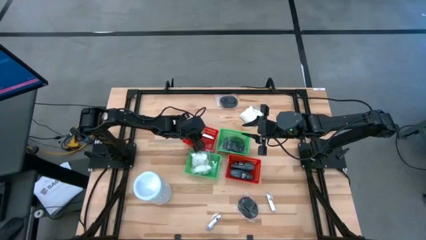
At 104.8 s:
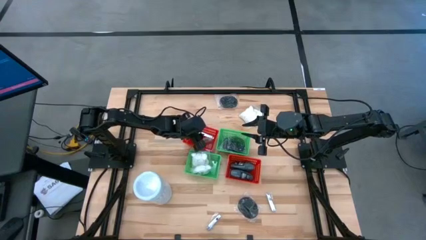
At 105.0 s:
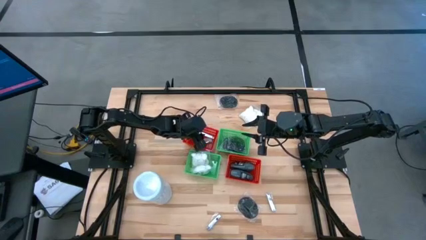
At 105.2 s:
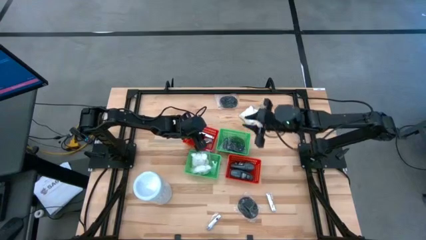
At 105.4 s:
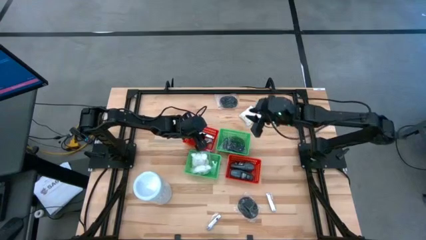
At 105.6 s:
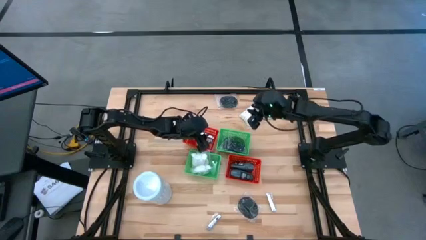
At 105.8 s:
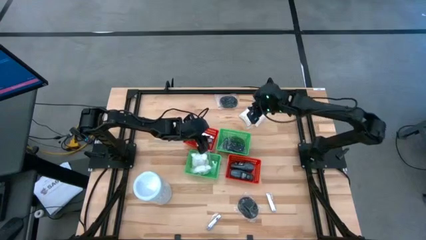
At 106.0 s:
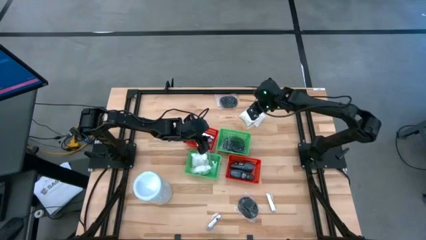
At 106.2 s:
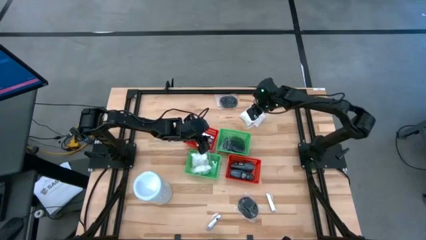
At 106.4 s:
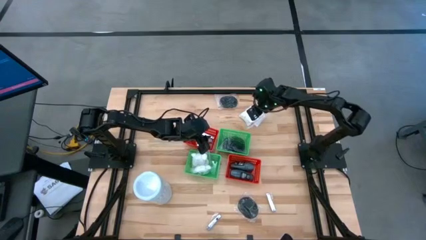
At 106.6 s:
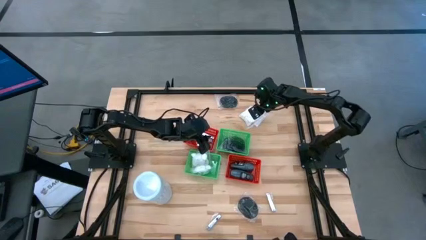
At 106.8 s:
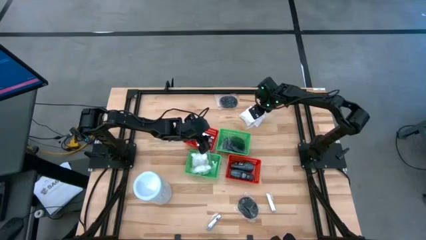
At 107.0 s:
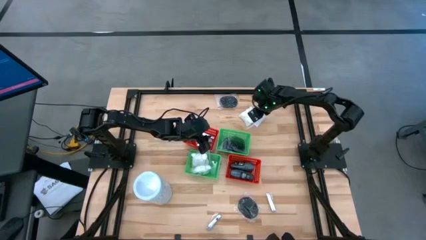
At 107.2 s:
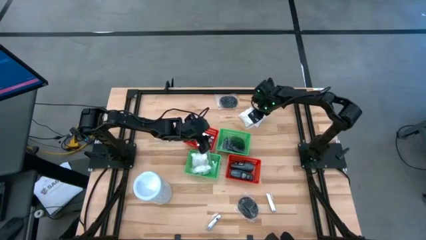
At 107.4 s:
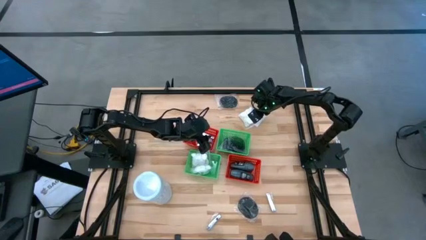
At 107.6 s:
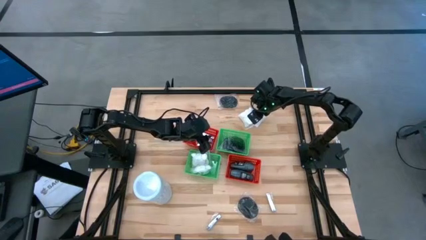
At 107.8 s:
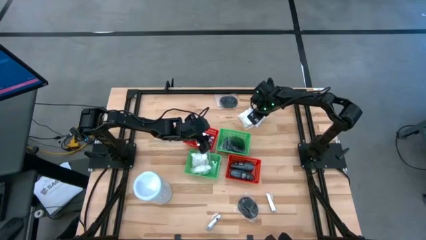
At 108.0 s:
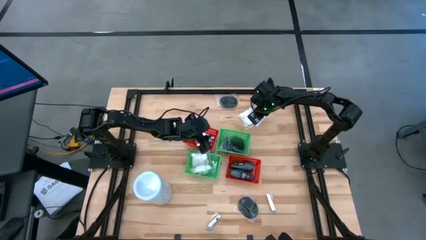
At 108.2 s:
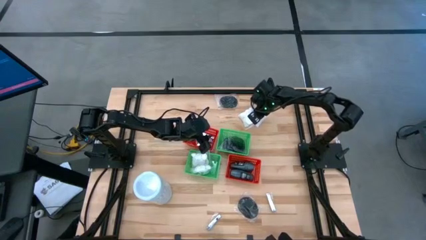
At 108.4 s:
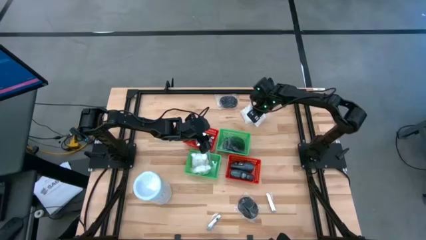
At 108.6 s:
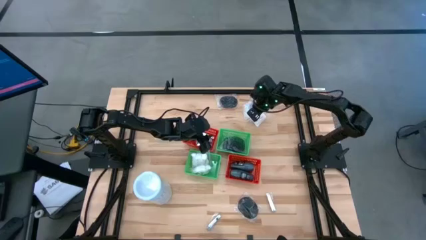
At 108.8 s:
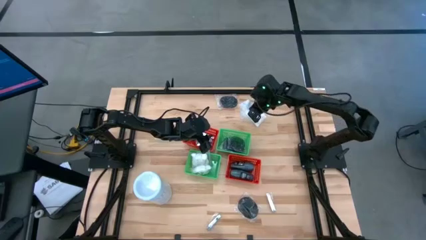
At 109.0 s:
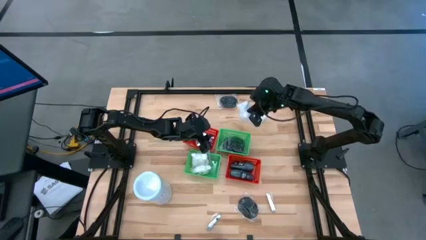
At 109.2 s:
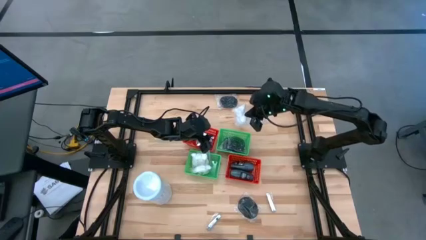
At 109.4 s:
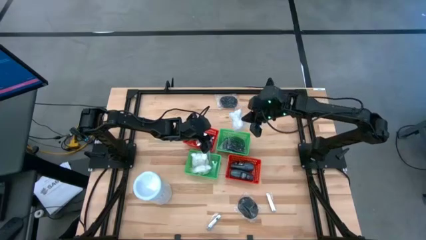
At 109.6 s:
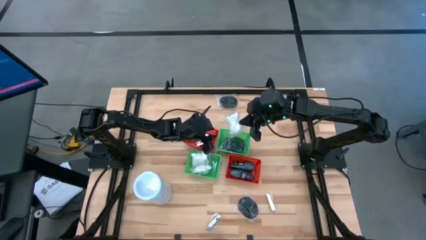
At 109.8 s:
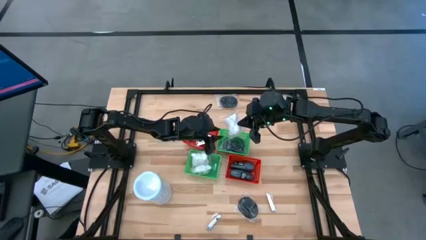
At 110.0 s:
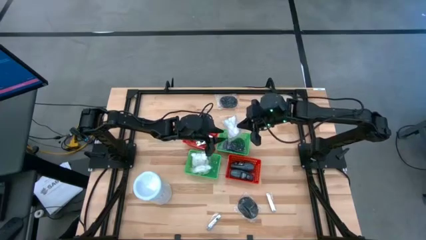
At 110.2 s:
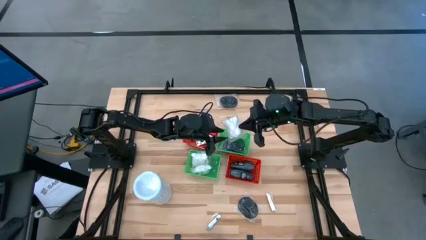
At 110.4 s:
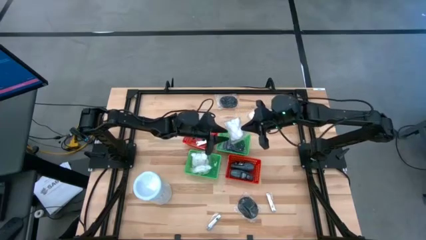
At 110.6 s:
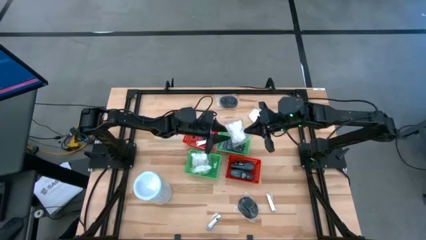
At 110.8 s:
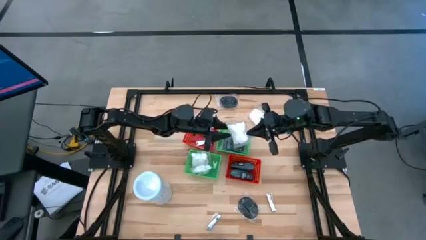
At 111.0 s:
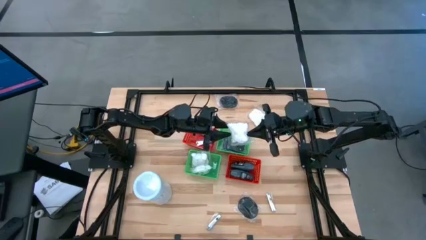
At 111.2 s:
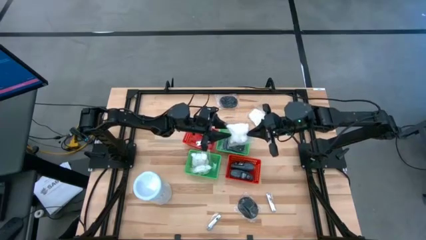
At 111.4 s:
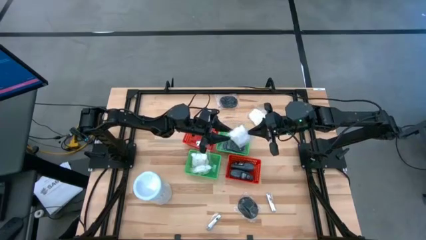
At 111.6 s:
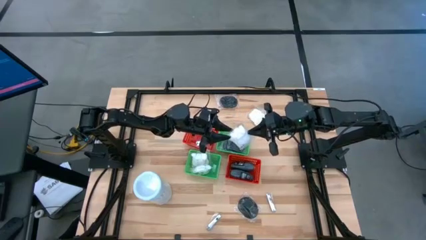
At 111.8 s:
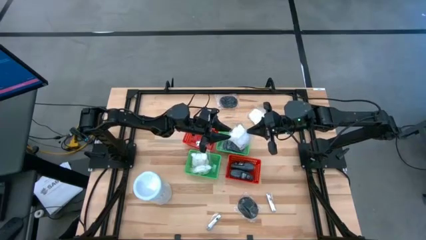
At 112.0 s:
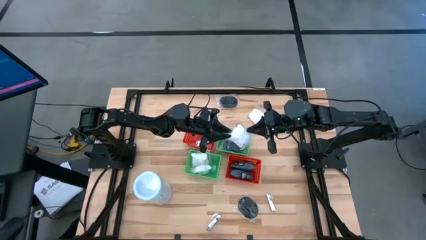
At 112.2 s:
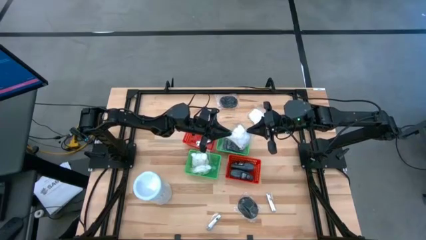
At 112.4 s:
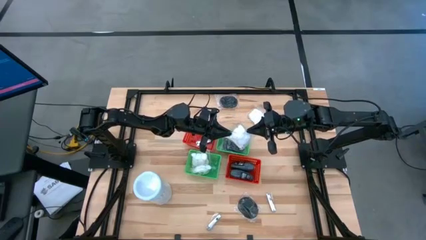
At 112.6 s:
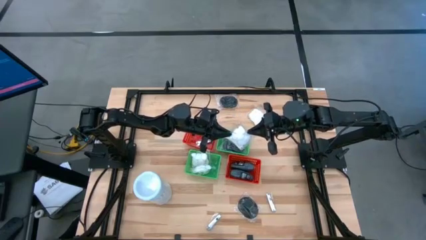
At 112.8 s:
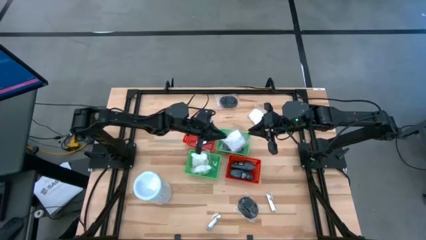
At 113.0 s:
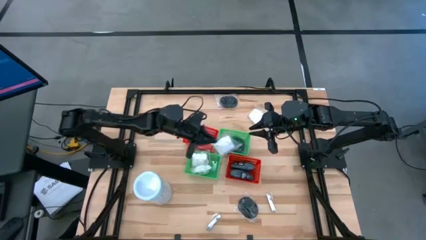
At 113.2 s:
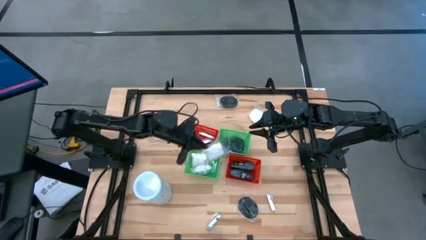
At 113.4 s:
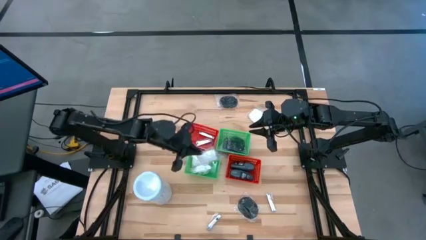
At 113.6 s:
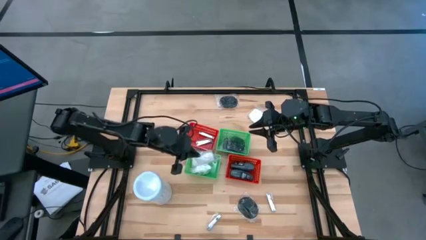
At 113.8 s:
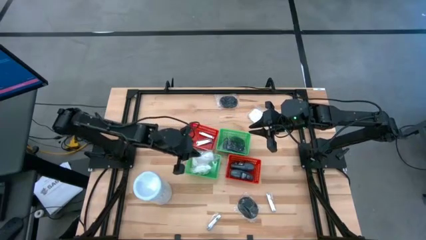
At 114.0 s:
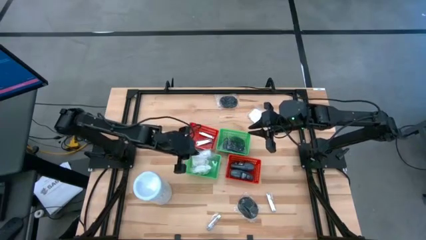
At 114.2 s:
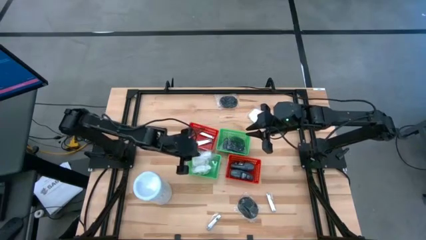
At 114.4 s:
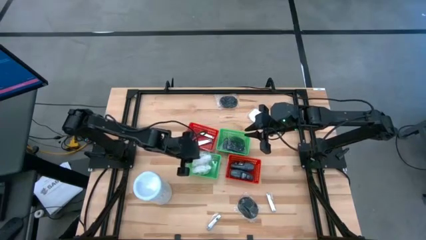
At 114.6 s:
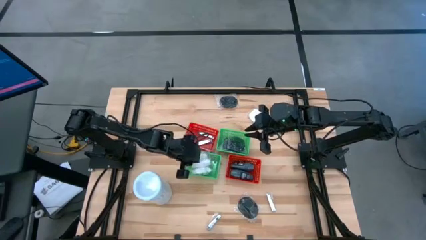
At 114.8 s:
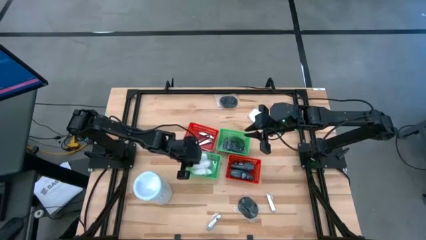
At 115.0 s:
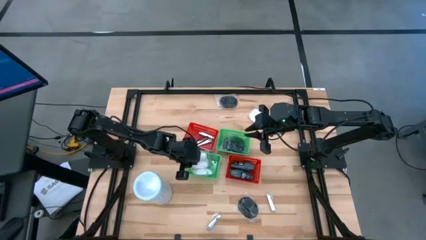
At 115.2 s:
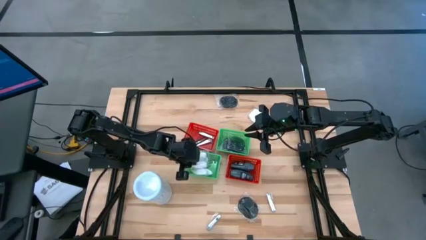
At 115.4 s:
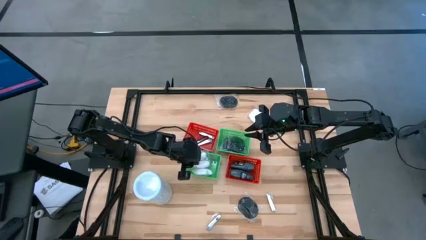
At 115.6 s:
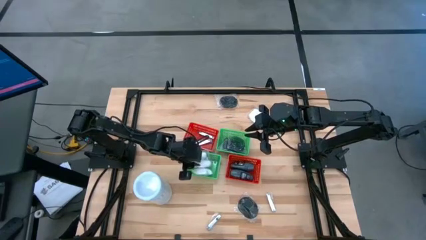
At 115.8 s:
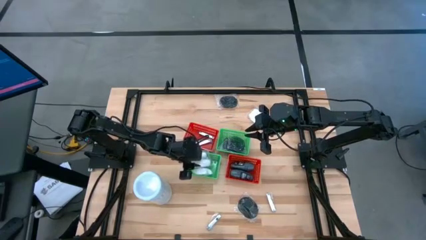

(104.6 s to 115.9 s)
Task: Pick & Place Travel size toiletries
Put the white cotton pack into the bottom left green bin

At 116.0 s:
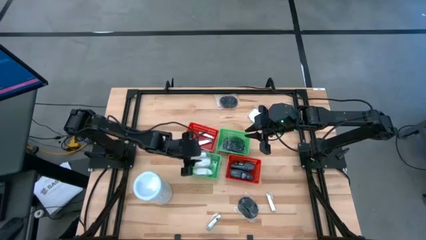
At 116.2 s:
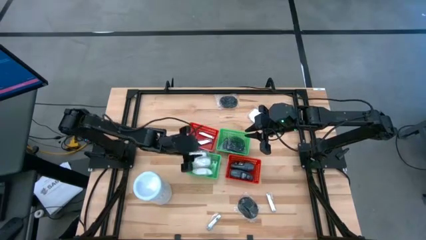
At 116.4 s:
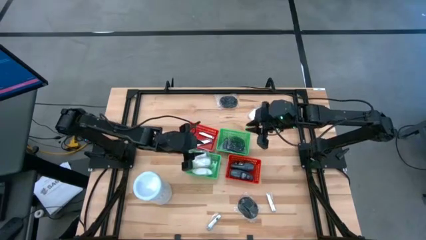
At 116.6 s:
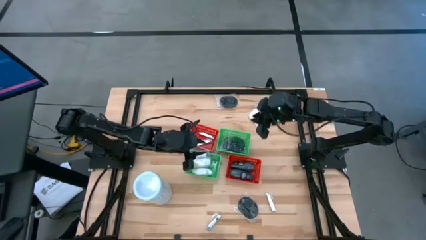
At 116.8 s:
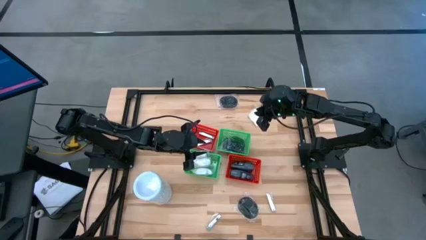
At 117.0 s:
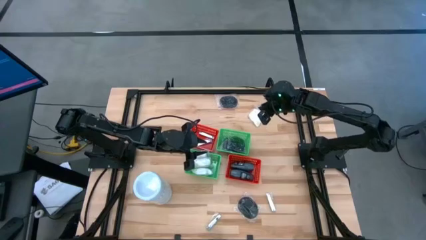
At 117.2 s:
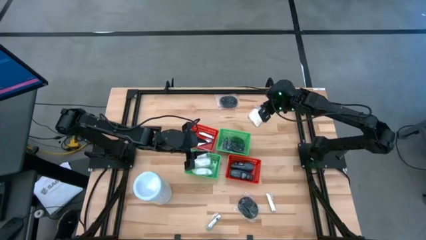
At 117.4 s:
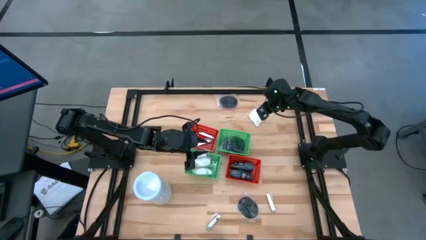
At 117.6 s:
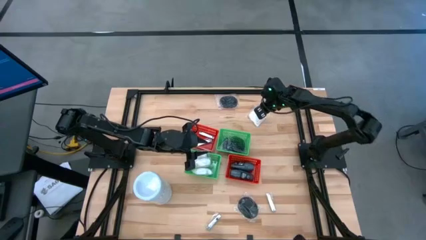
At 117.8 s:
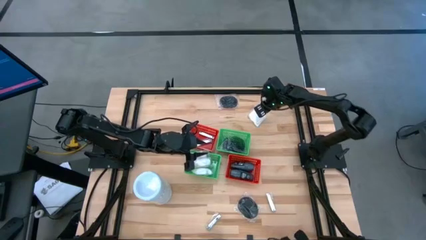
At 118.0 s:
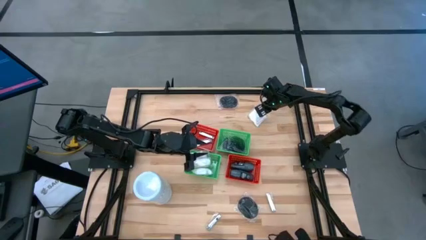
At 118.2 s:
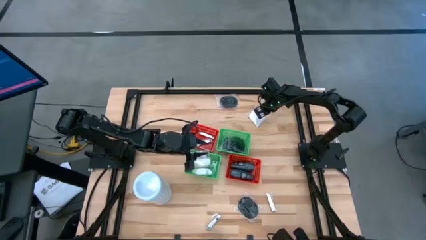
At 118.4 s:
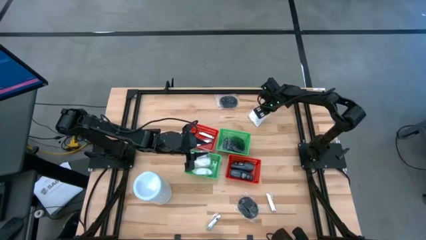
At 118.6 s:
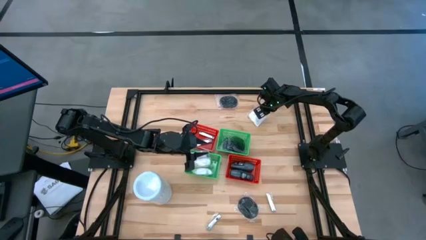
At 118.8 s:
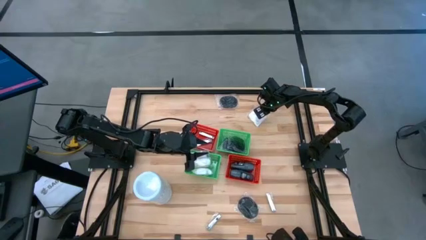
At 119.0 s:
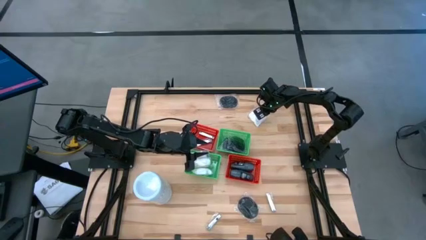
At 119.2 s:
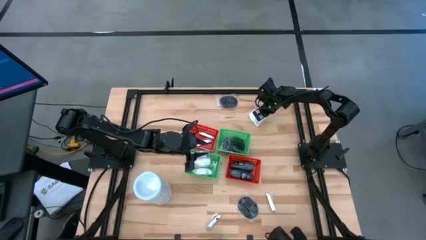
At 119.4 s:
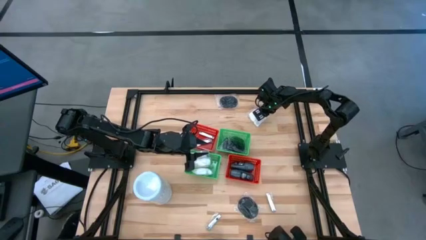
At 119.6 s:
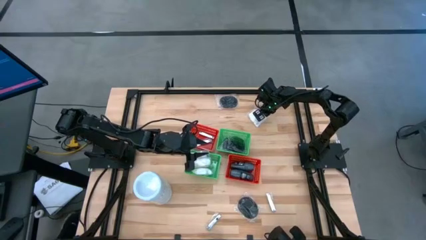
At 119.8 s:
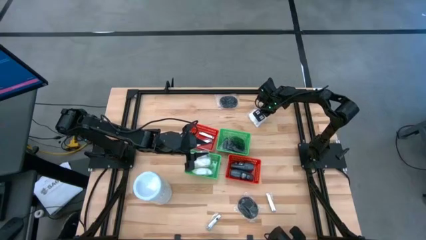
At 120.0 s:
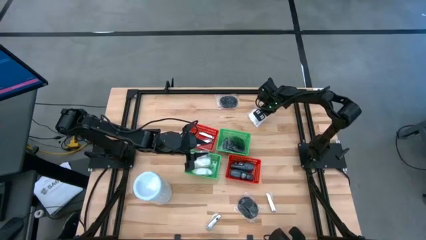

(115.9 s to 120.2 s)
Put the white cotton pack into the bottom left green bin
